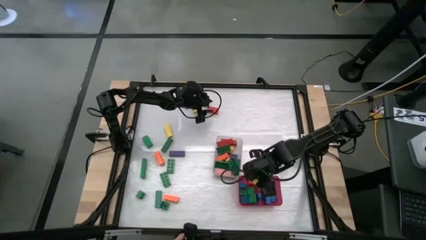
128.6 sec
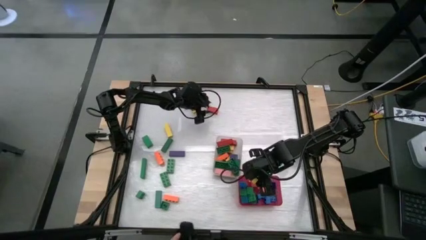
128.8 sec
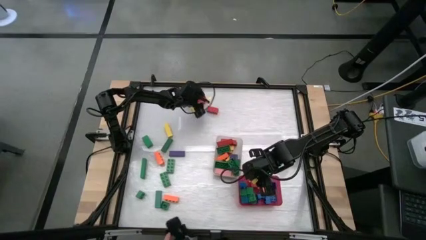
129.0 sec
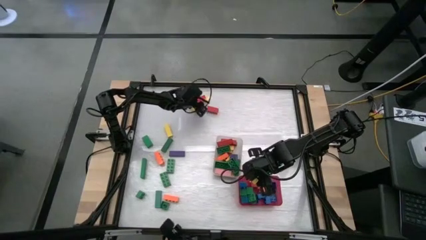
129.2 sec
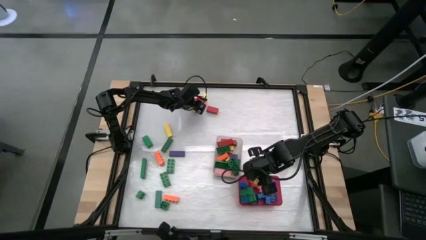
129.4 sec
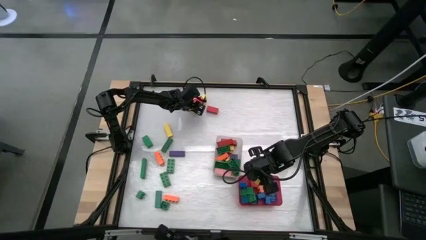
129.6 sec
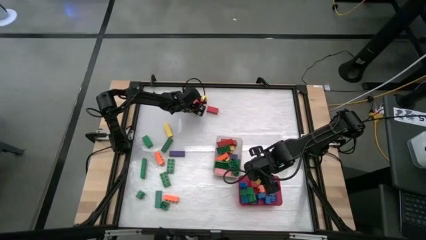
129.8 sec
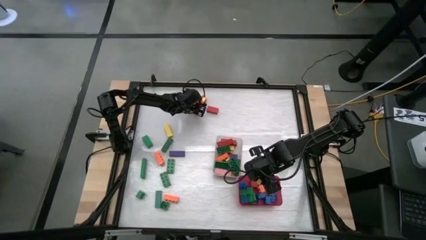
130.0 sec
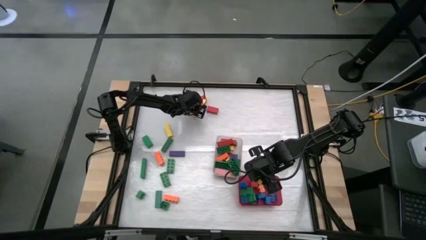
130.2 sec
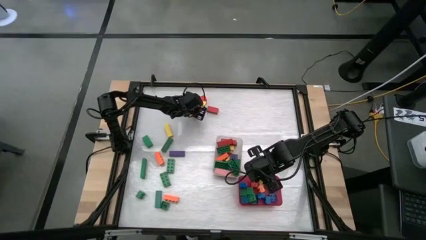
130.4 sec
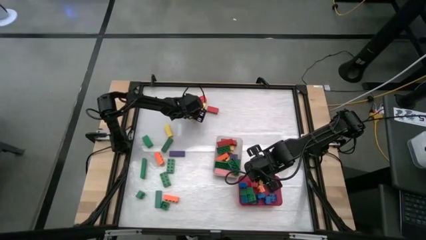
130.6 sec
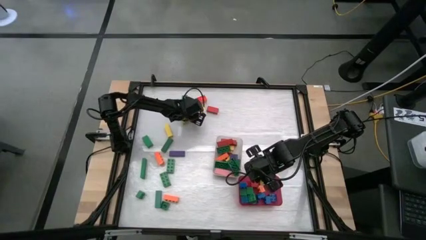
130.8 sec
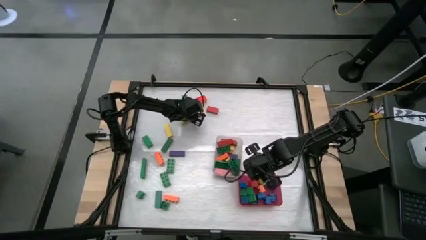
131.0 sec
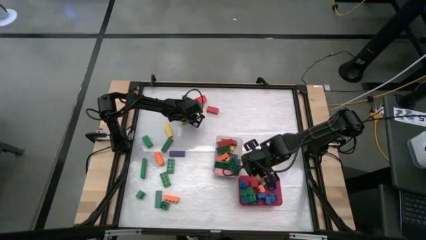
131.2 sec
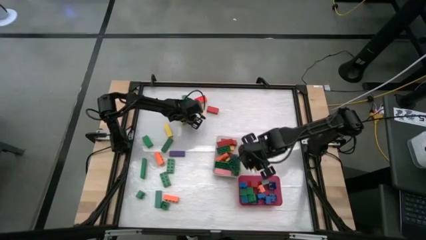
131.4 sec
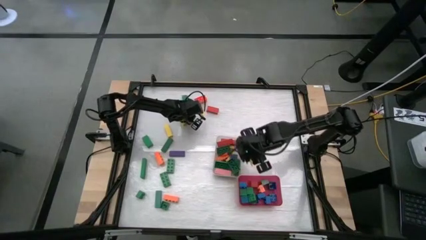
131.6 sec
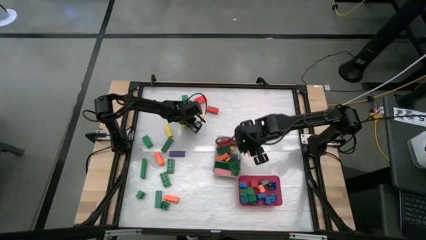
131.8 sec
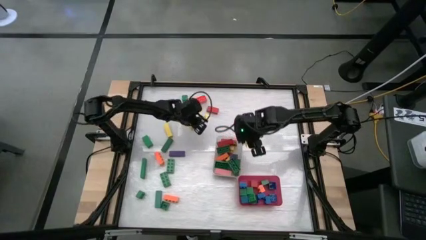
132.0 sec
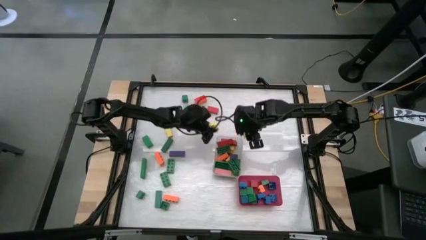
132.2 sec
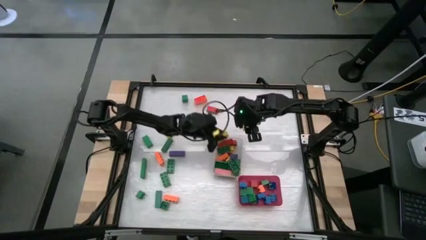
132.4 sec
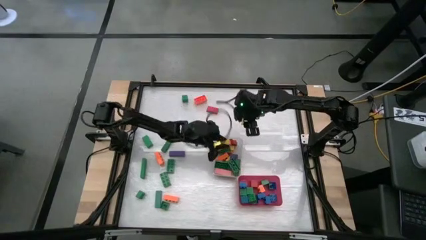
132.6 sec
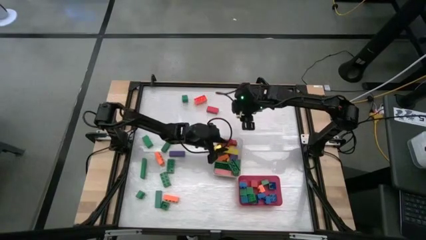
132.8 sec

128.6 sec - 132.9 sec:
Task: Sort blocks by size
Put the yellow rectangular block into the transparent bin

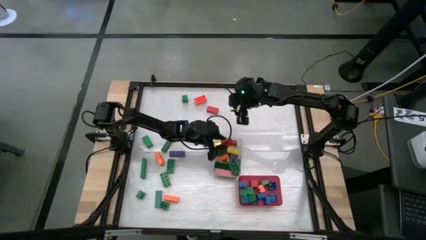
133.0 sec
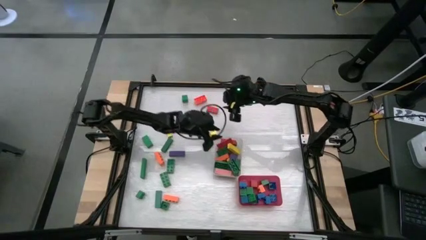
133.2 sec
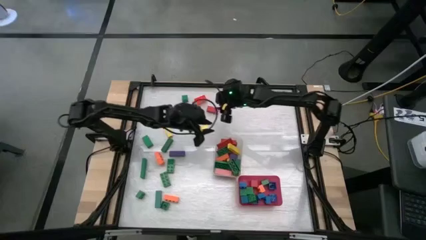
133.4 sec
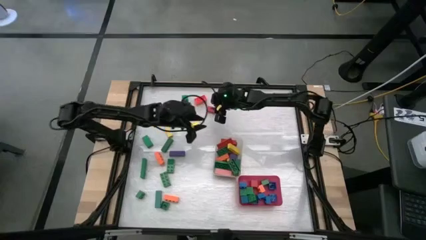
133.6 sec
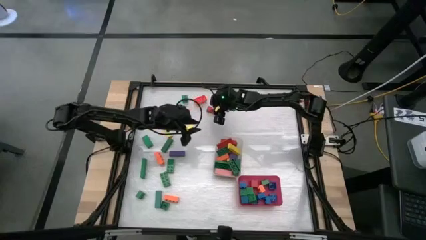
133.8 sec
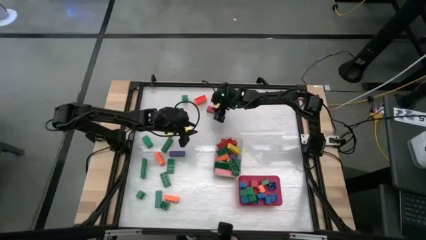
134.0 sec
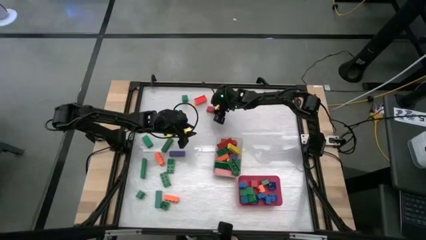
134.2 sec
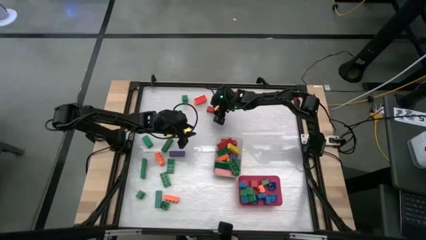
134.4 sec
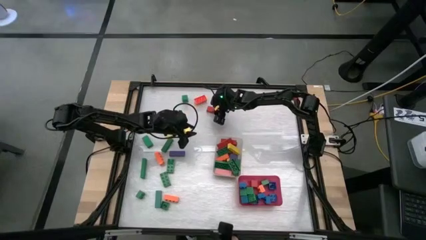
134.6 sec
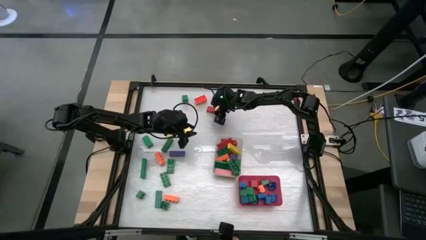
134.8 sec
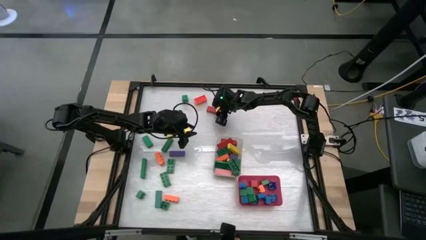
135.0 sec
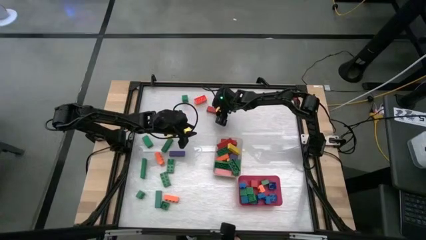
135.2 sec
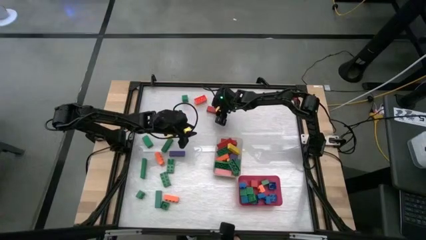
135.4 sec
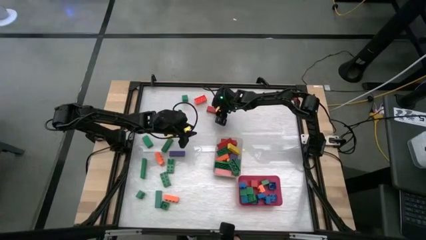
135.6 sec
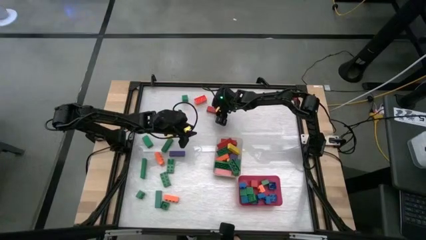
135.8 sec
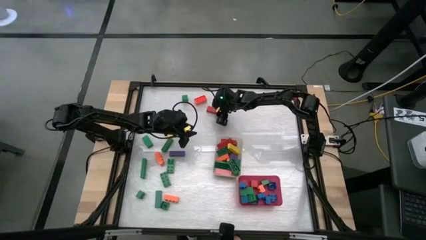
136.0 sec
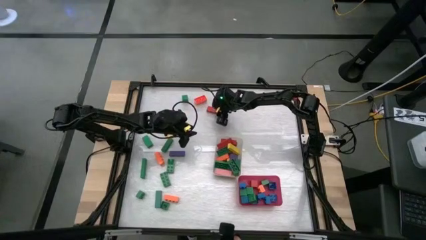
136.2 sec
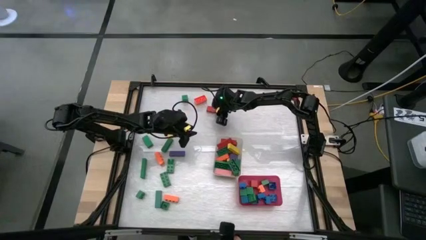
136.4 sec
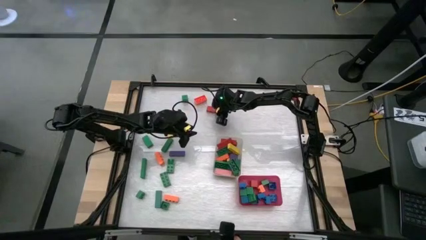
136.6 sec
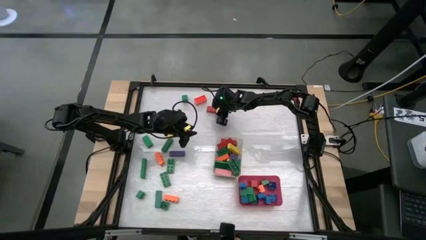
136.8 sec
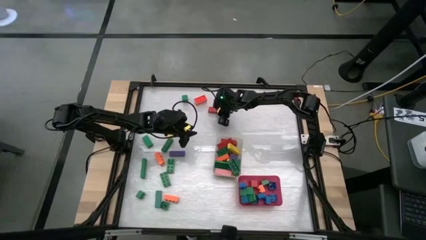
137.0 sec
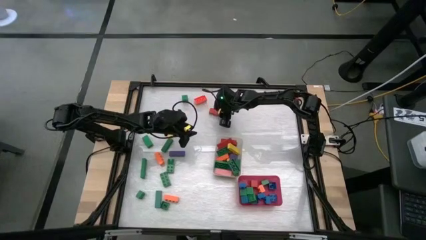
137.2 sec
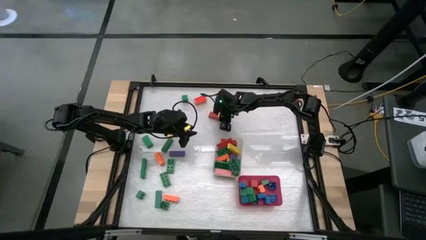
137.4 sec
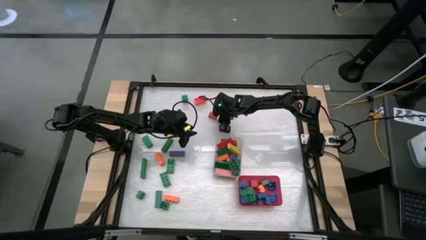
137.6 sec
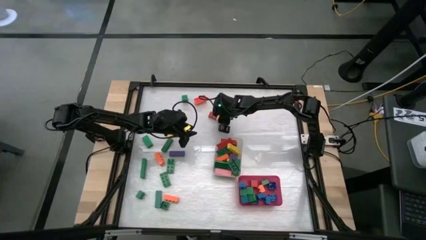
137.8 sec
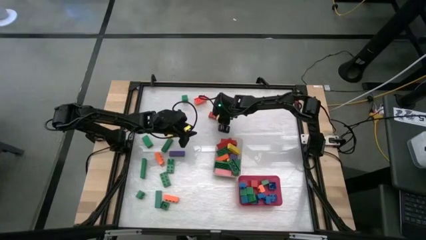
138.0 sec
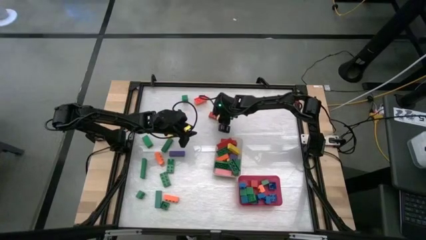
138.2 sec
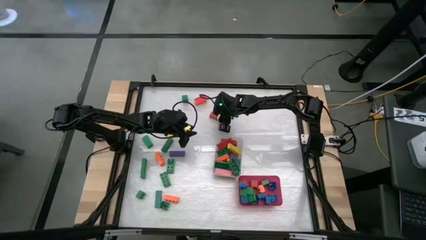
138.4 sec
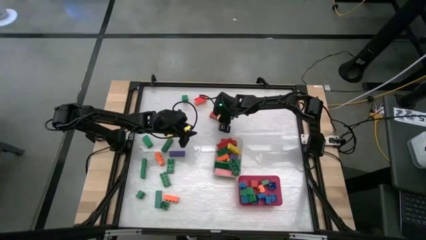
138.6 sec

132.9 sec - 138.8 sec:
Put the red rectangular block into the transparent bin

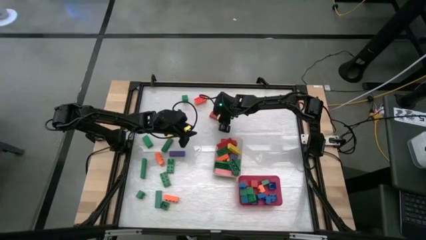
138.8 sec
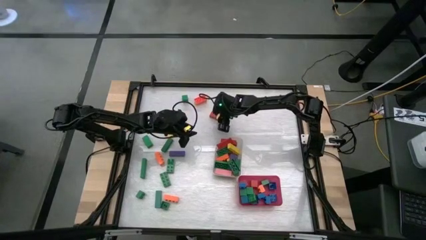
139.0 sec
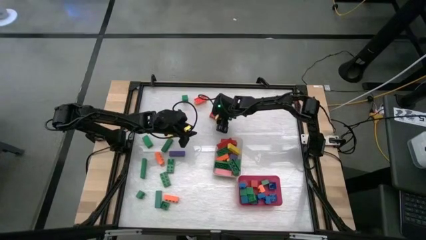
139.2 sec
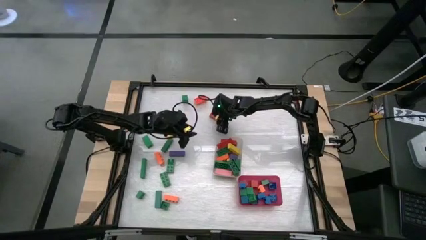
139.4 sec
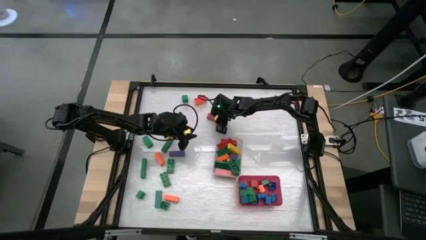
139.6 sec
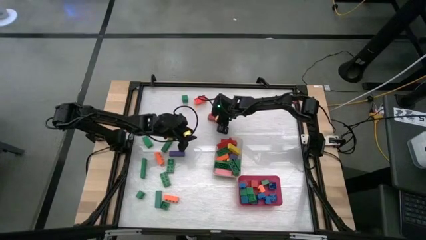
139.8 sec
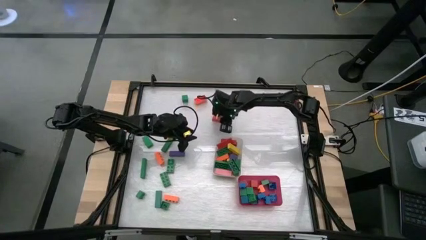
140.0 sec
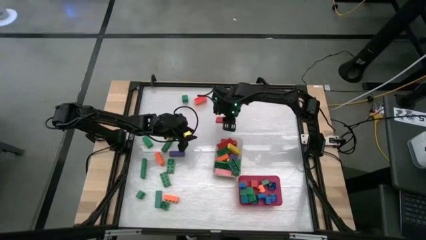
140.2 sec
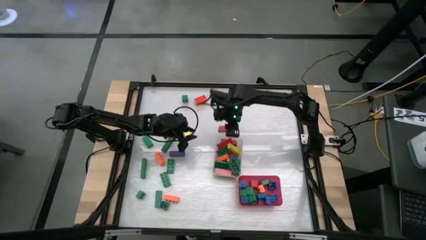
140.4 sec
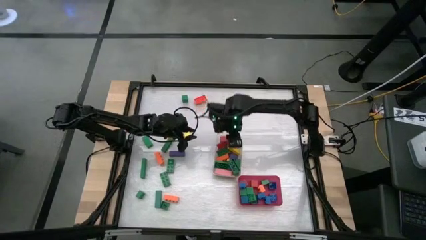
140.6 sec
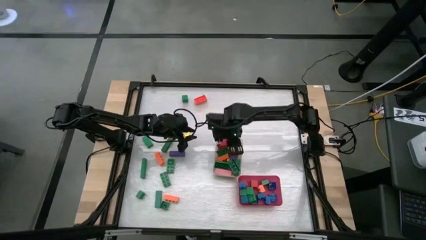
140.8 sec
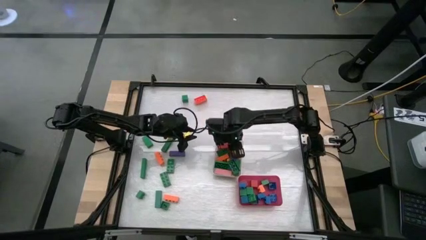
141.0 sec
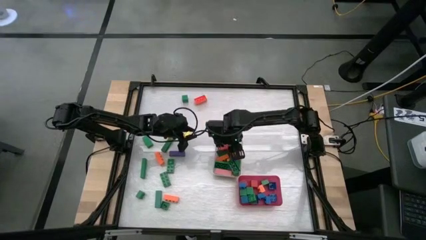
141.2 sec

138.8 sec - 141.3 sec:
Put the red rectangular block into the transparent bin

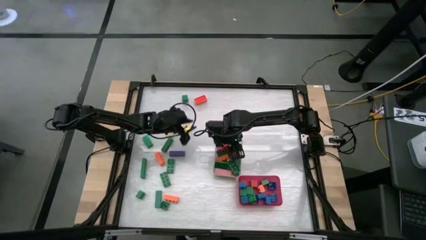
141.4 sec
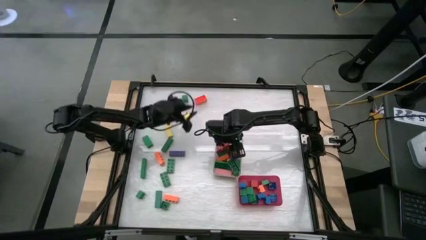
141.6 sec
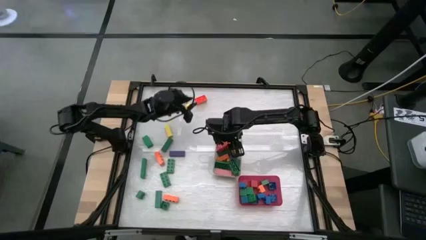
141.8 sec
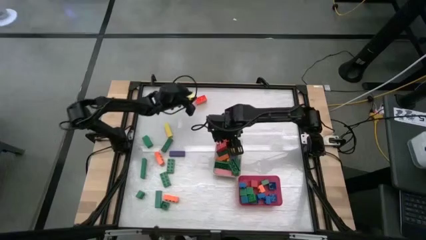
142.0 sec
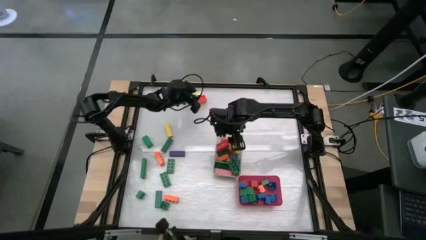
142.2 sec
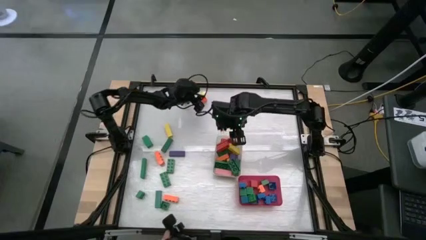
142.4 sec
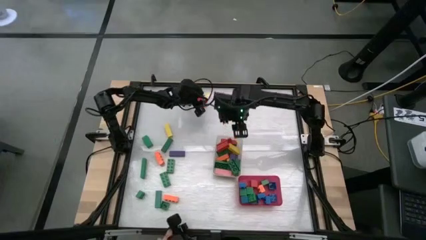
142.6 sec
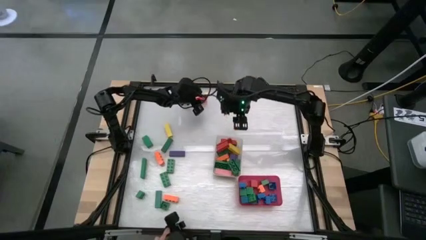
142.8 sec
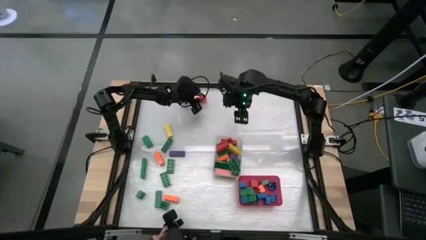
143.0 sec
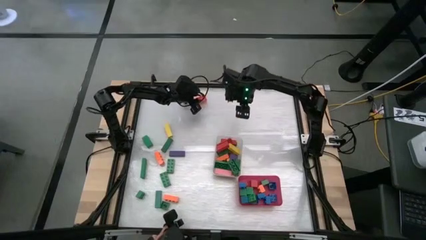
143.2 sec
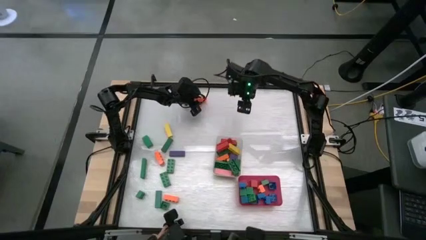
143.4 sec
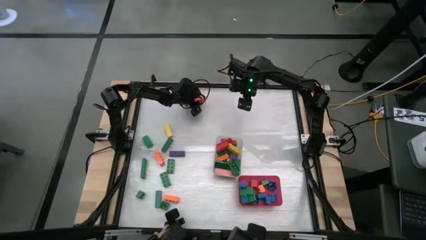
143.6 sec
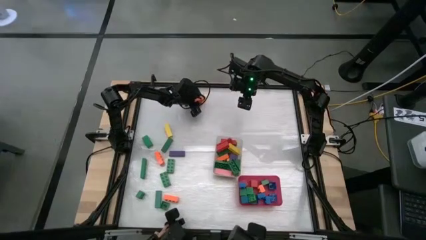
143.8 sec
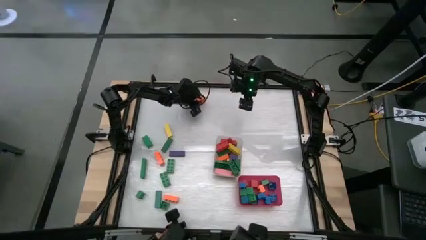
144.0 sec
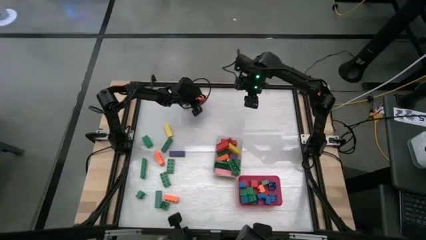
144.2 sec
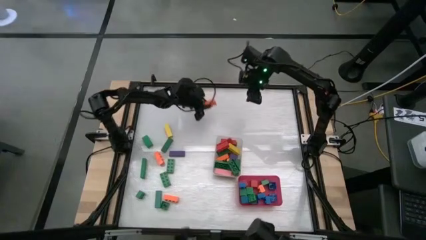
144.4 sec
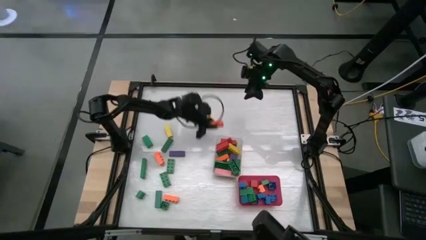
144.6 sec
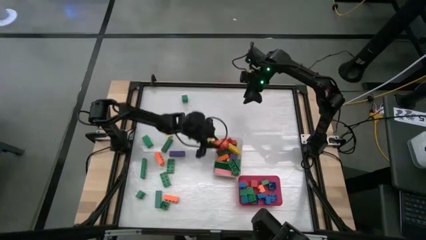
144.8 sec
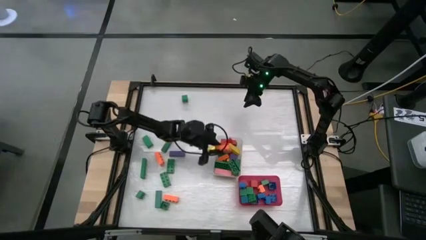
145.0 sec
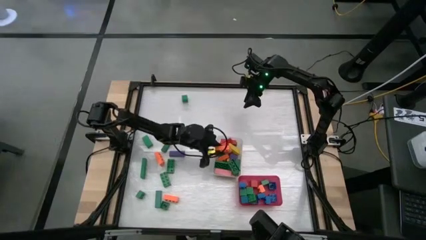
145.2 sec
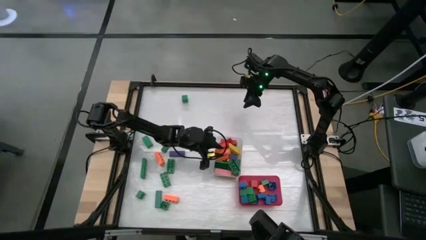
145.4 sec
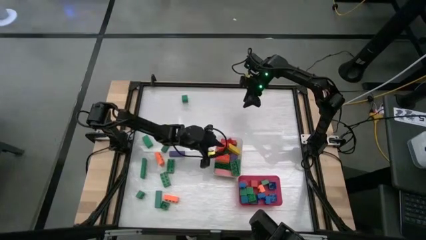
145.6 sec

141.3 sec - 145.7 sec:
Put the orange rectangular game piece into the transparent bin
